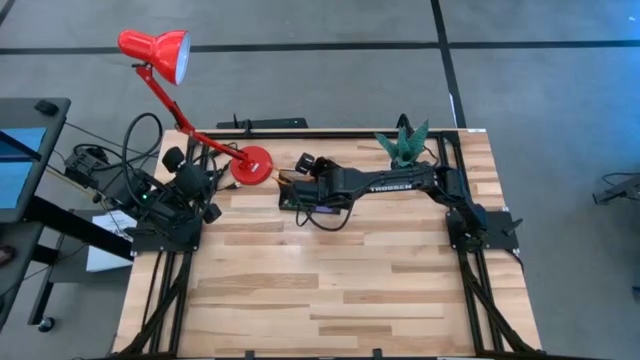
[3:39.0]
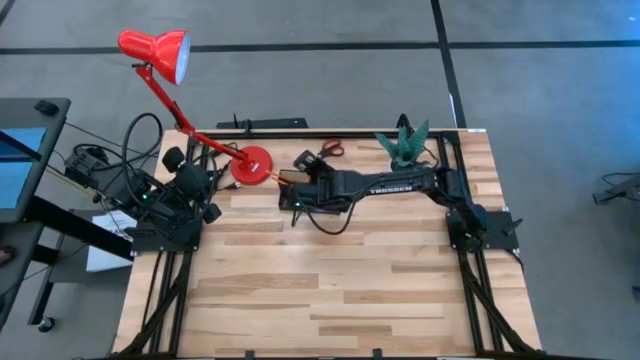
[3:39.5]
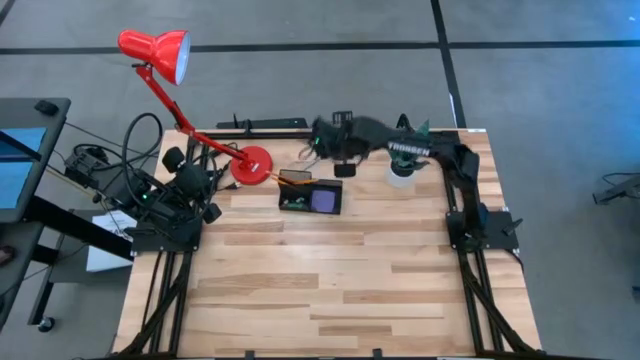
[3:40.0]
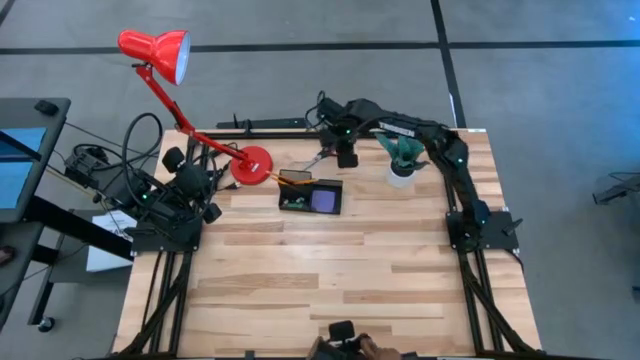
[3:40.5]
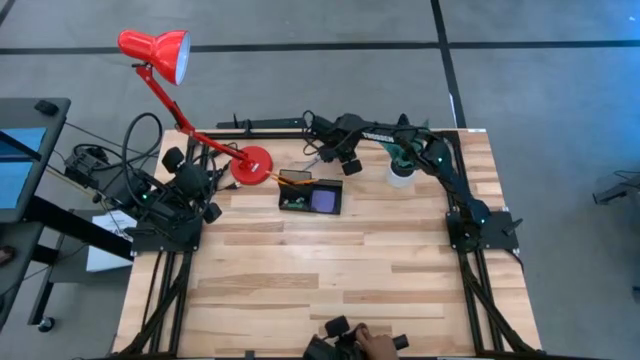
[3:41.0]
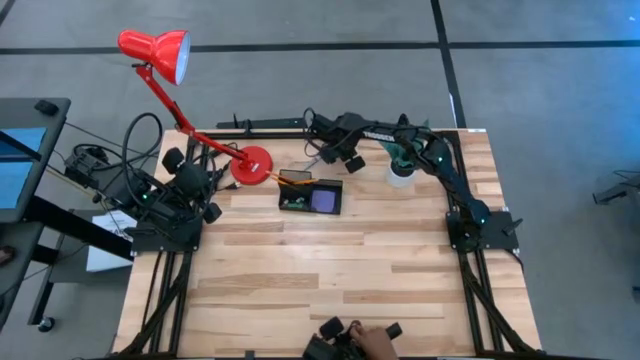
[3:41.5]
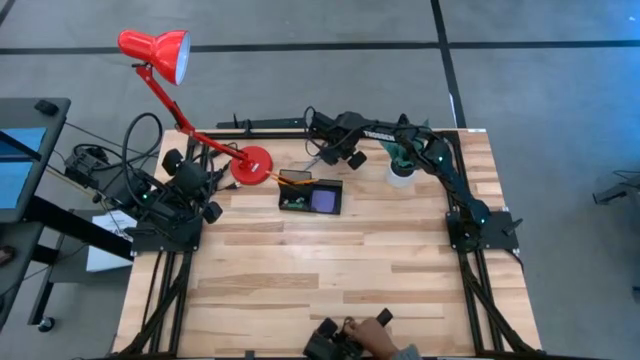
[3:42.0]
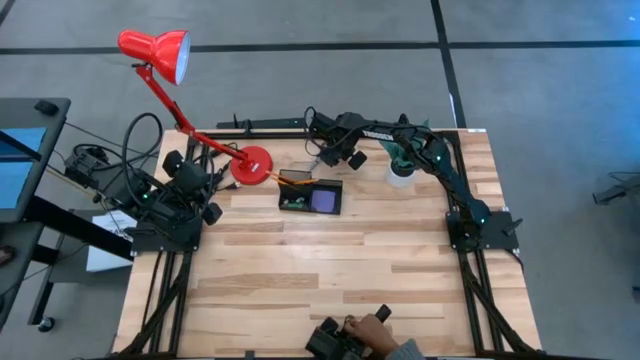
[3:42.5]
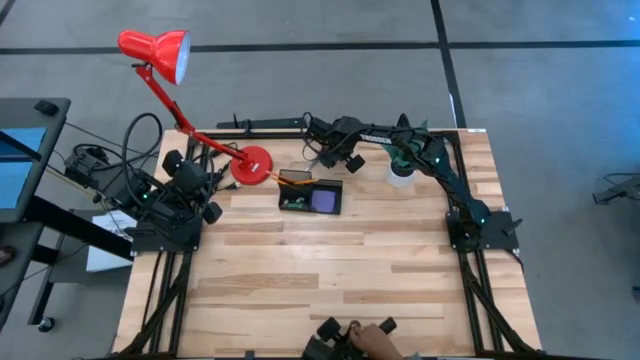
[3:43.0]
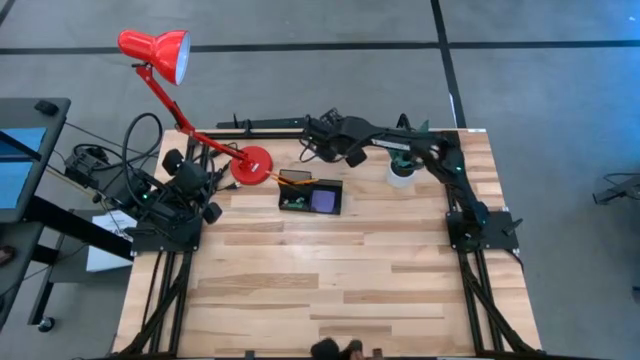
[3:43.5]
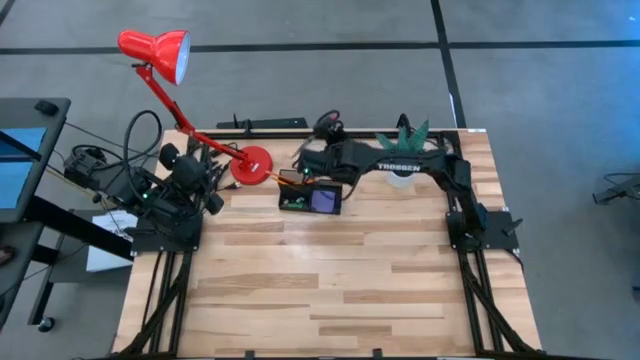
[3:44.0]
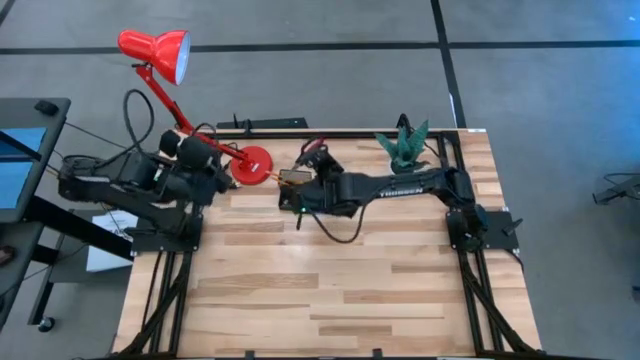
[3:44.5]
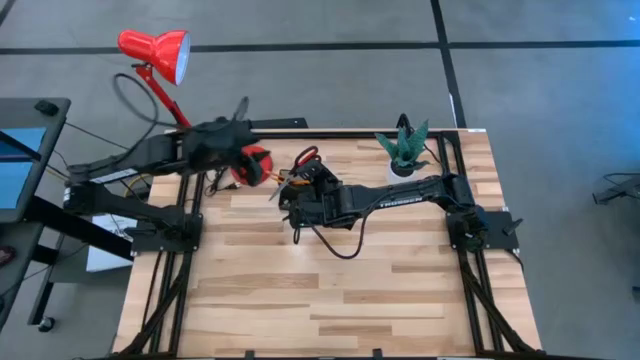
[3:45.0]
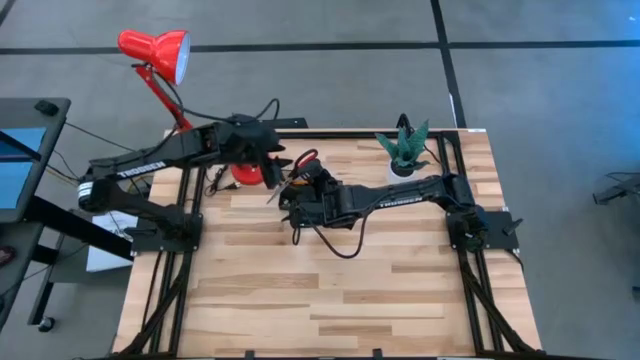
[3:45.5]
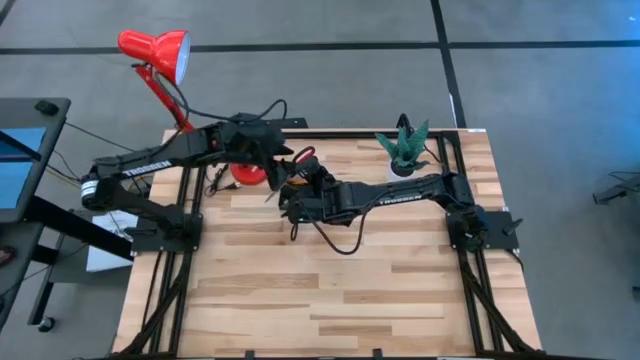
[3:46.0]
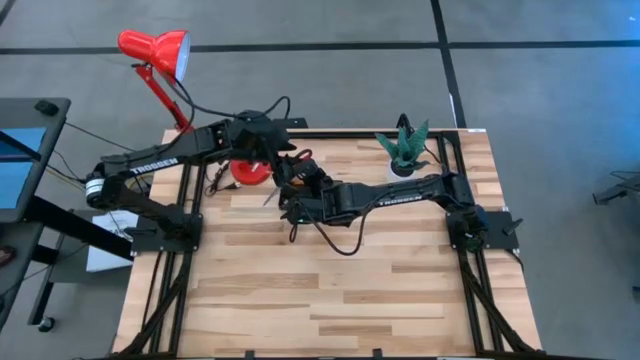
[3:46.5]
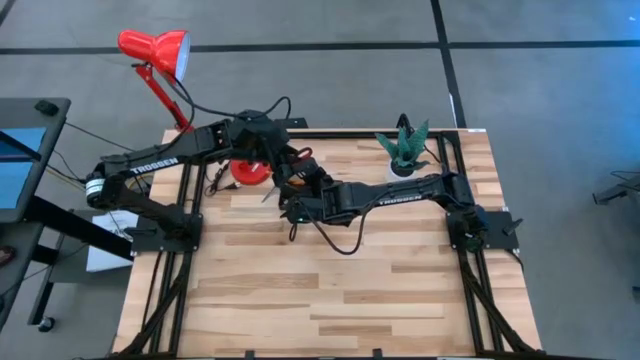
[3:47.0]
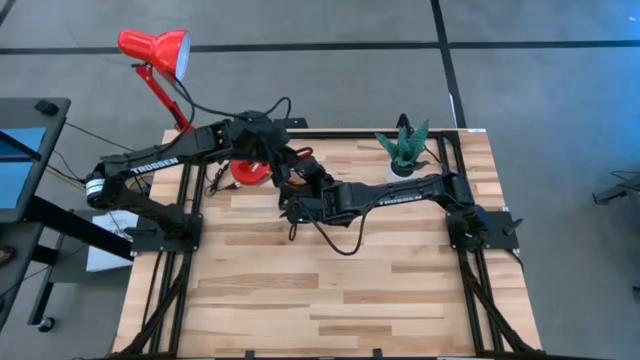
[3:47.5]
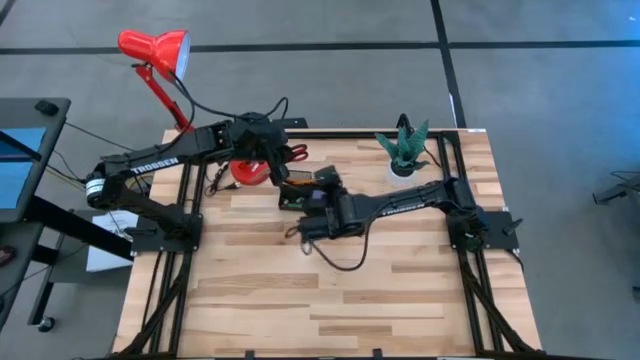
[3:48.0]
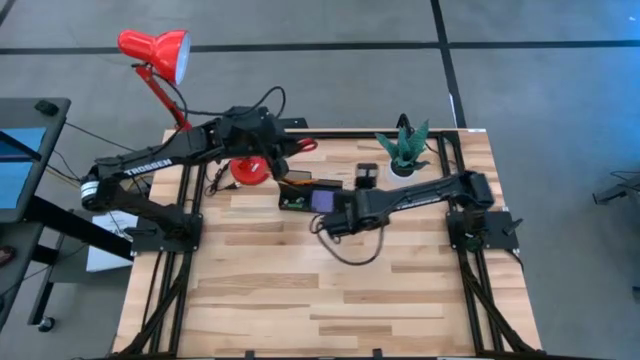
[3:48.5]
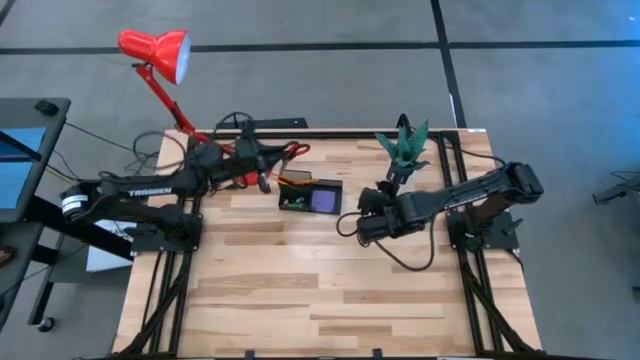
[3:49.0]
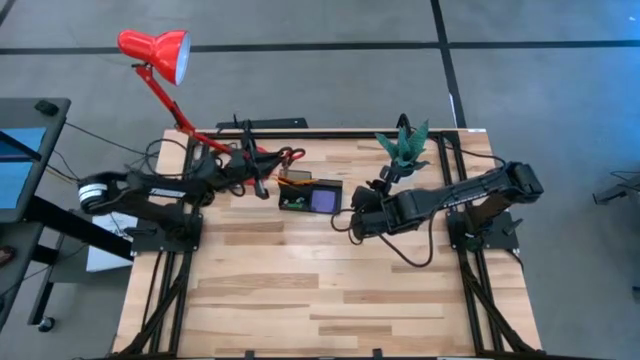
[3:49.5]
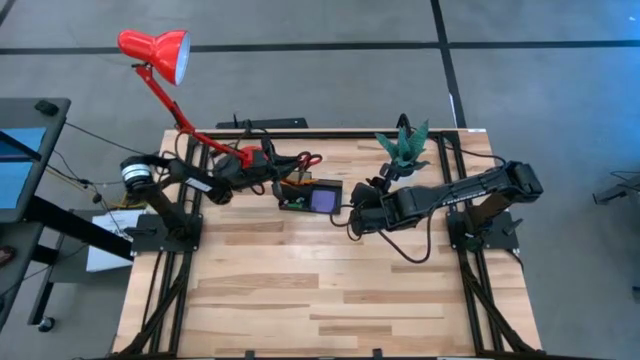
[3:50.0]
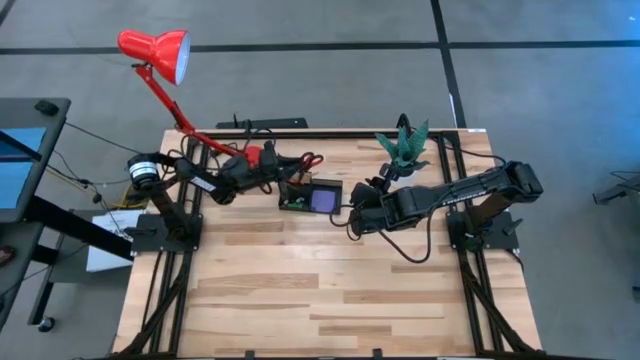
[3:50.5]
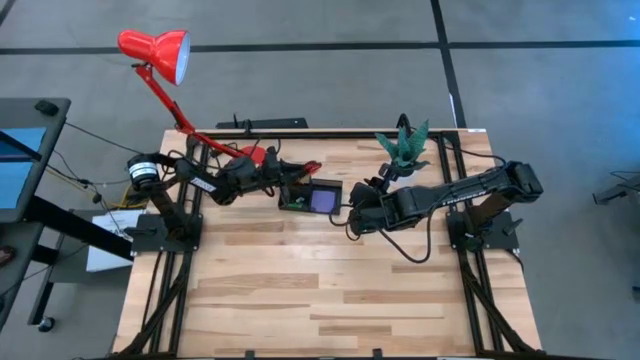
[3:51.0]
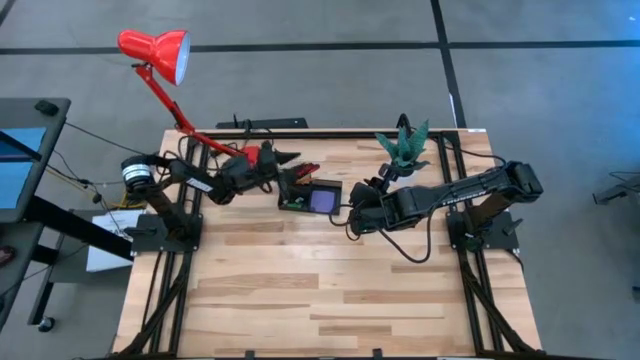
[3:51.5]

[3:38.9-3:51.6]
Task: Pick and place office supplies into organizer
Put the black scissors into the black desk organizer

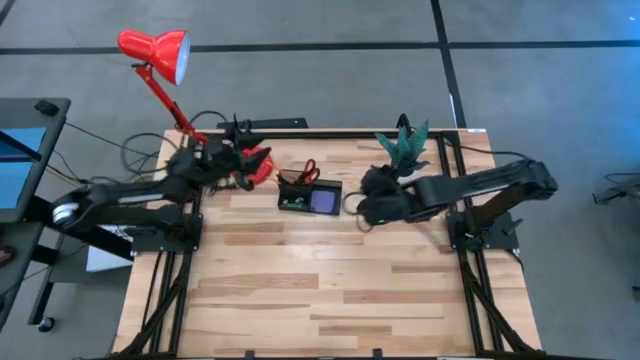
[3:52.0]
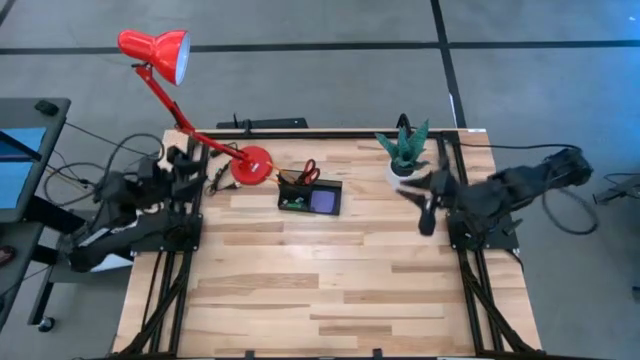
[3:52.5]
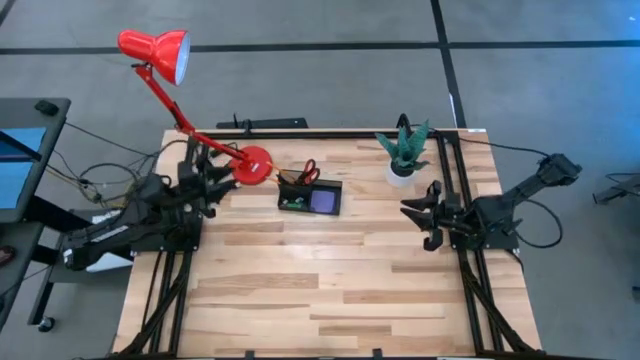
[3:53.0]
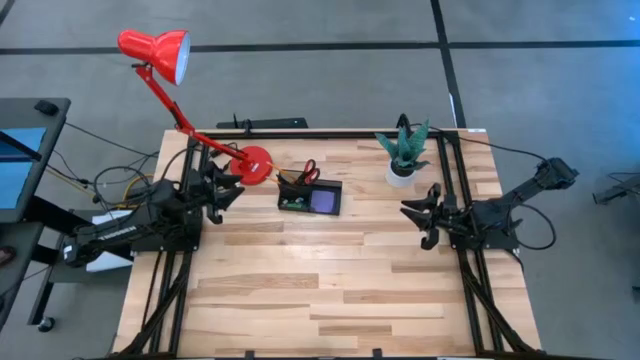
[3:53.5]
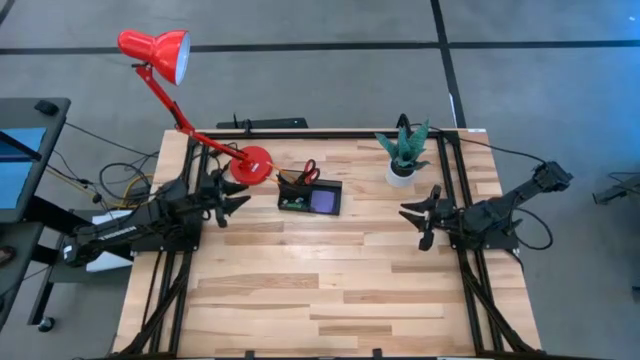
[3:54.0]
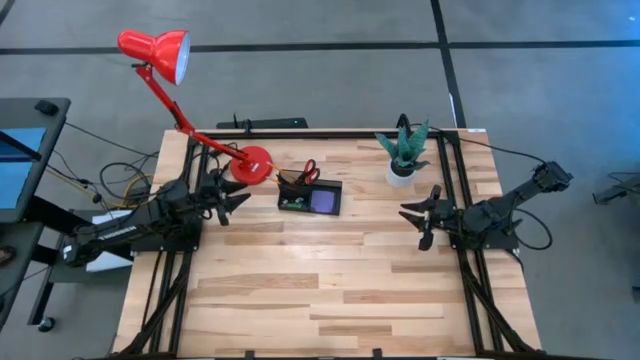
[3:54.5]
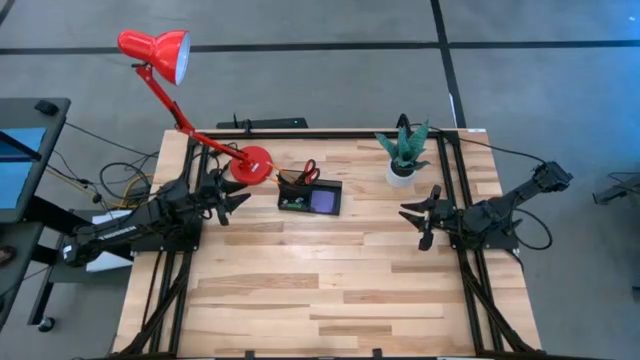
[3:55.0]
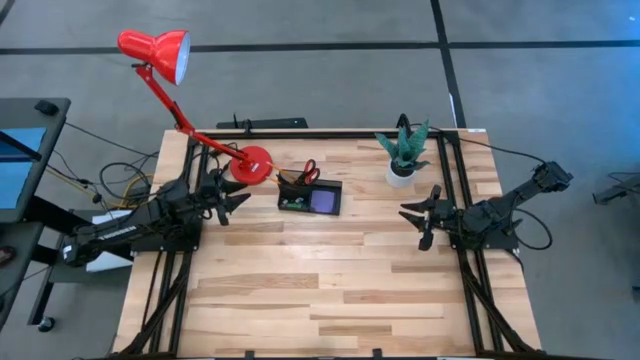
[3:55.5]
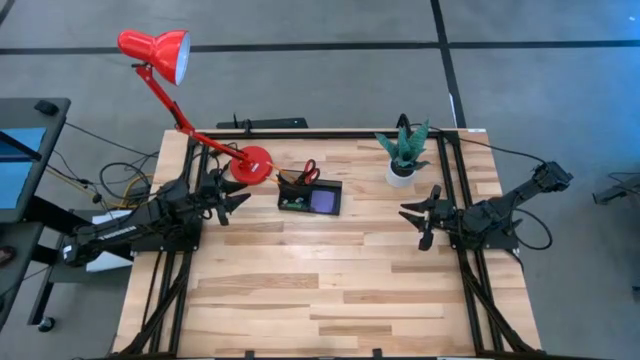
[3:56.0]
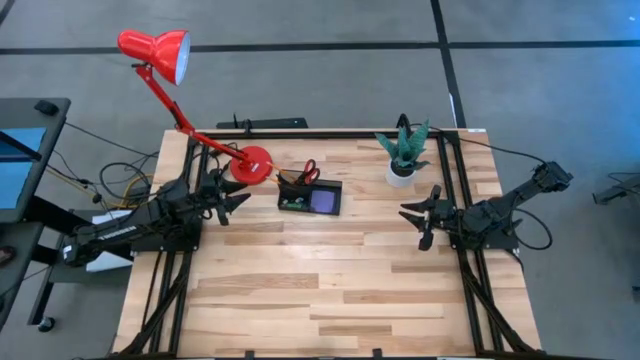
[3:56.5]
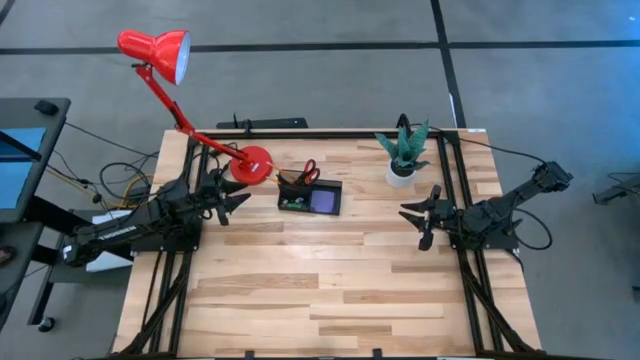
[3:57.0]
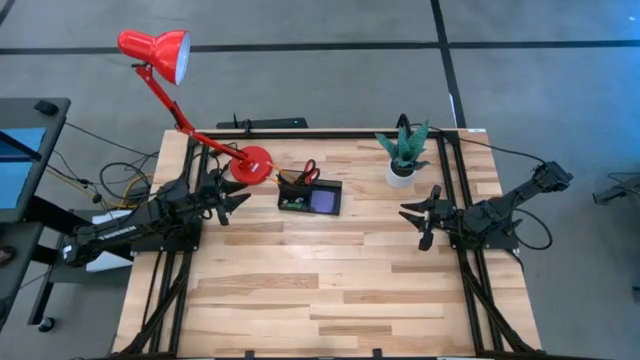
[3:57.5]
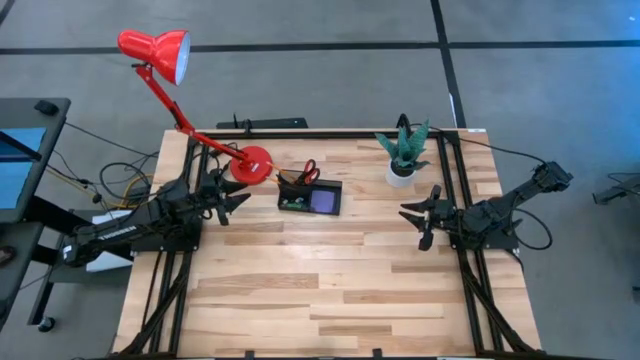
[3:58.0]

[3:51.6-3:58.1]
Return to Home Position
